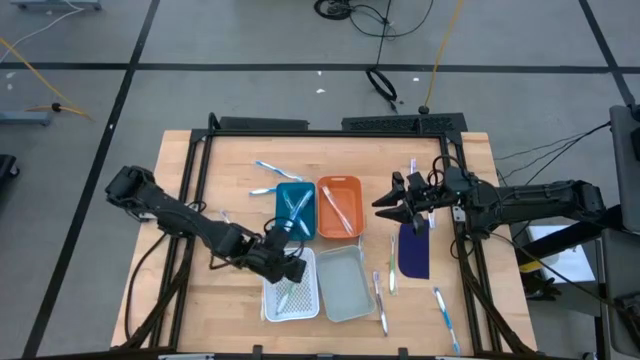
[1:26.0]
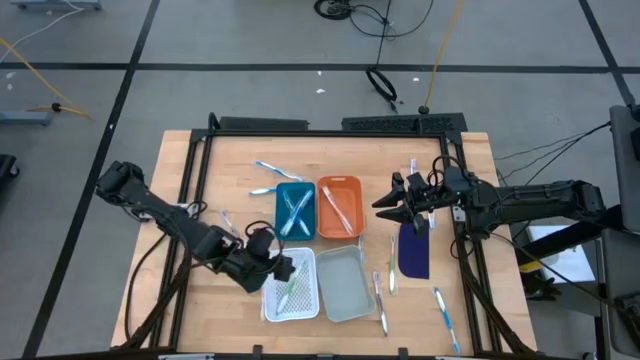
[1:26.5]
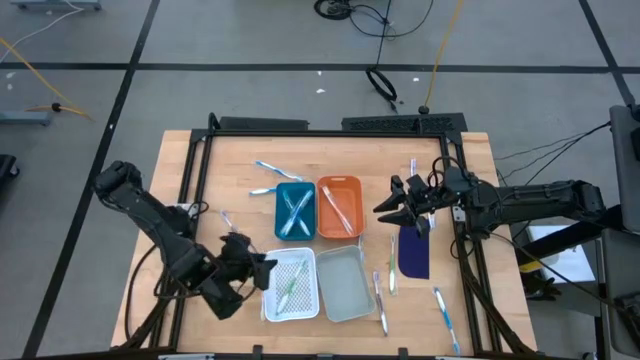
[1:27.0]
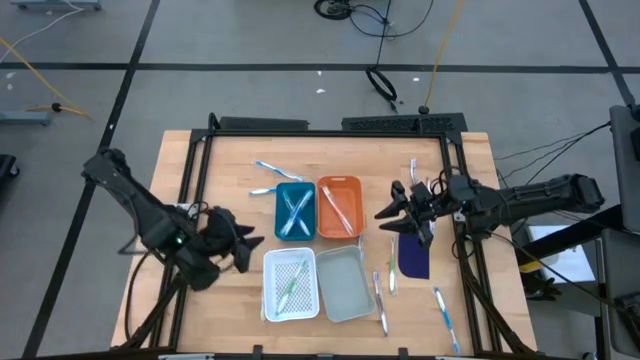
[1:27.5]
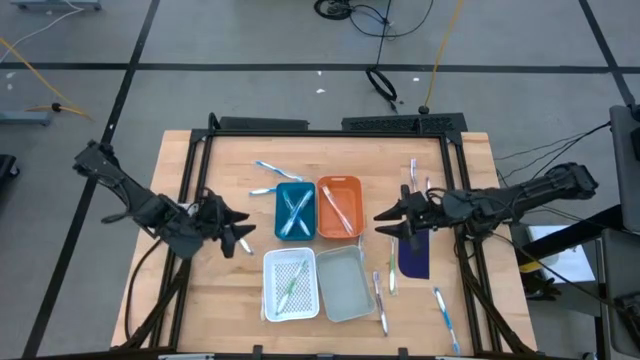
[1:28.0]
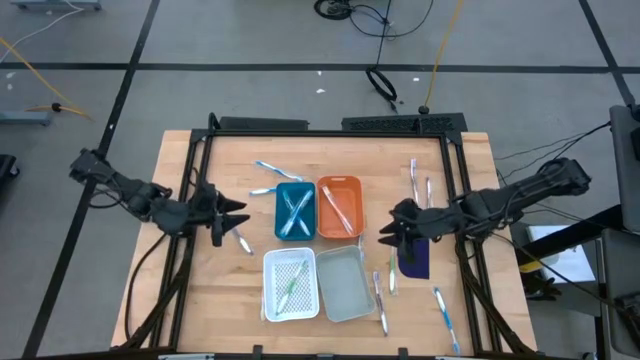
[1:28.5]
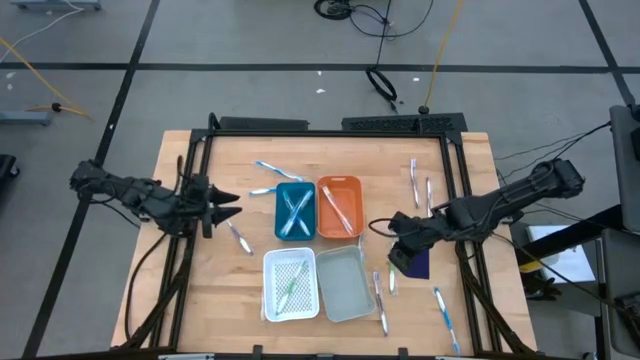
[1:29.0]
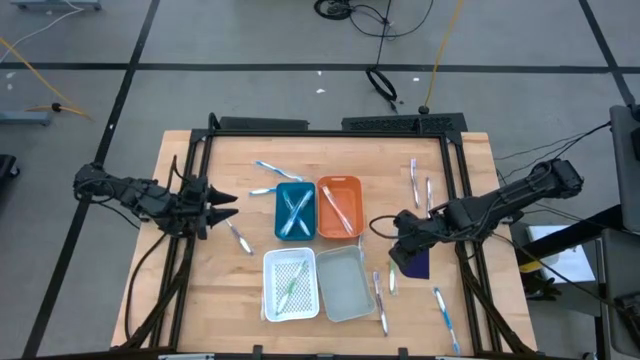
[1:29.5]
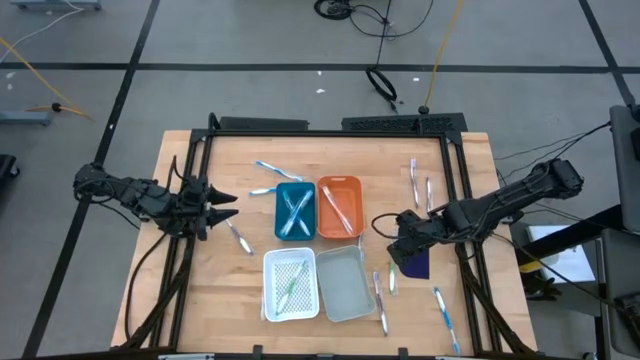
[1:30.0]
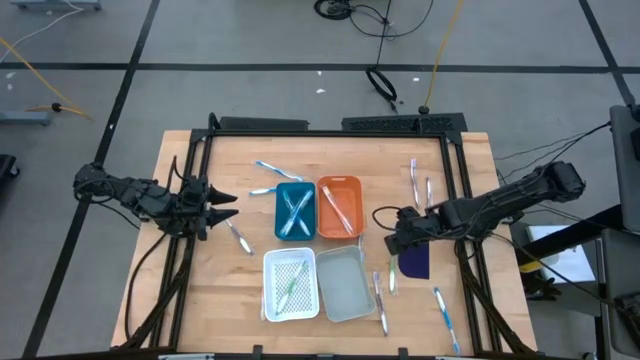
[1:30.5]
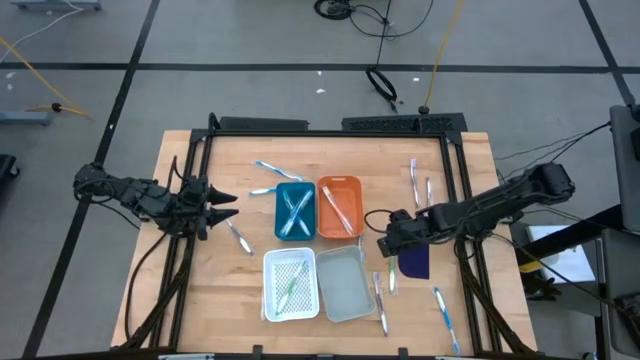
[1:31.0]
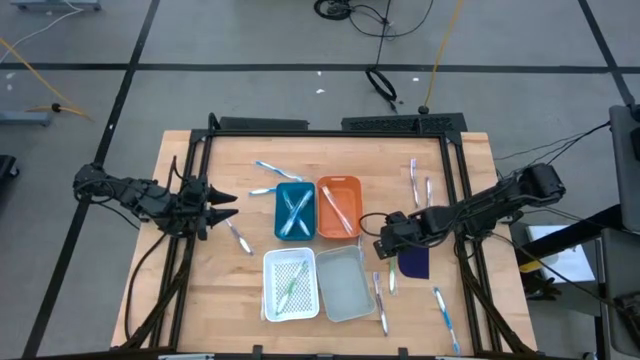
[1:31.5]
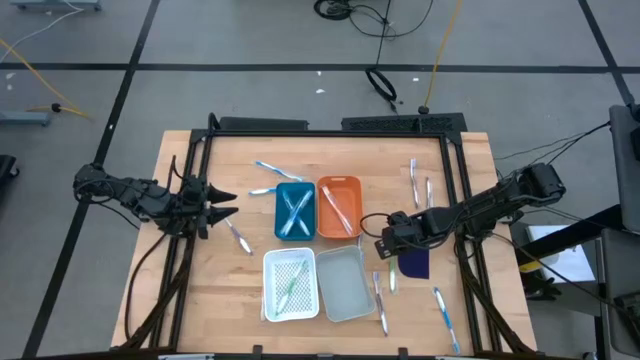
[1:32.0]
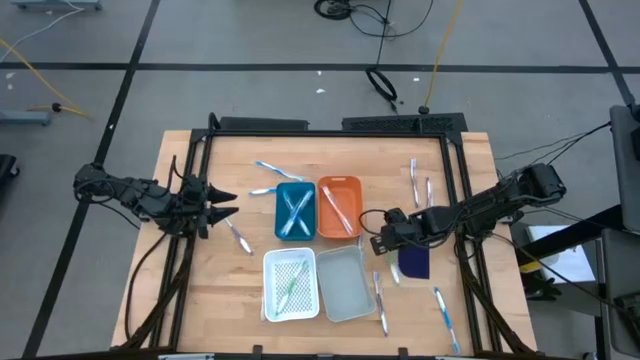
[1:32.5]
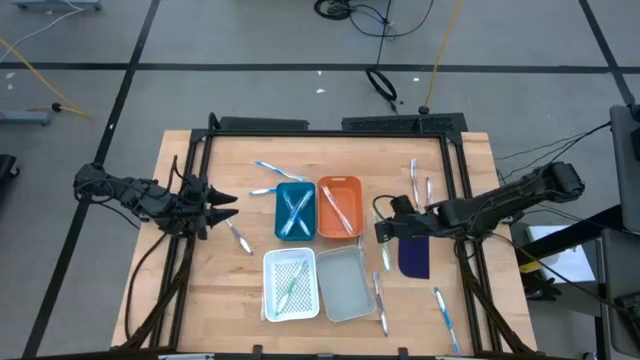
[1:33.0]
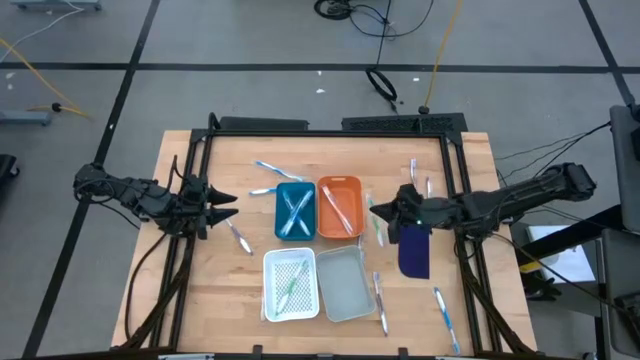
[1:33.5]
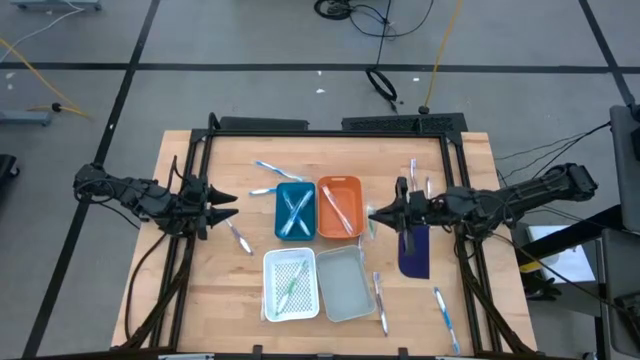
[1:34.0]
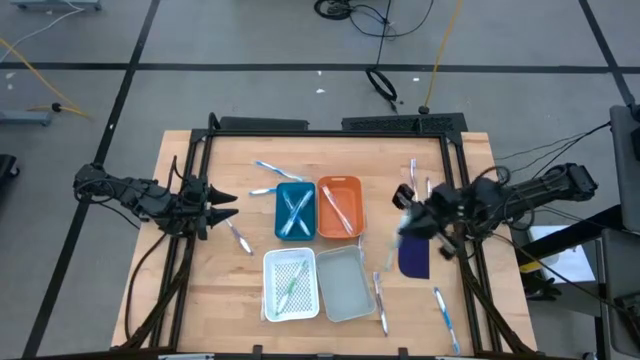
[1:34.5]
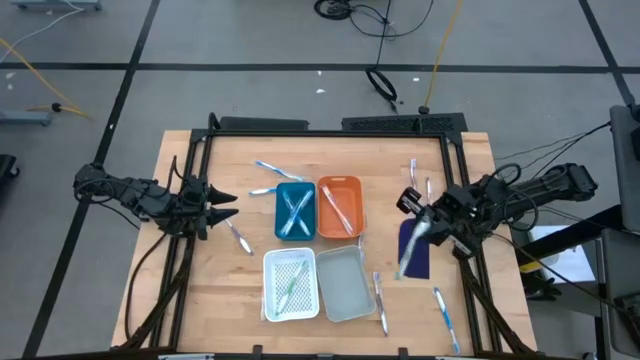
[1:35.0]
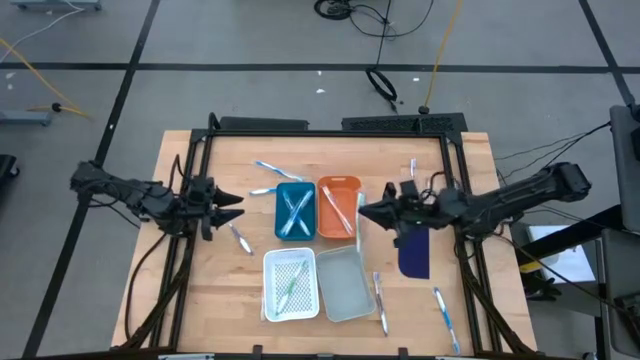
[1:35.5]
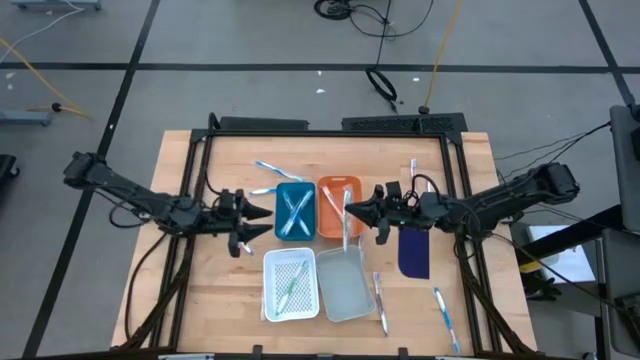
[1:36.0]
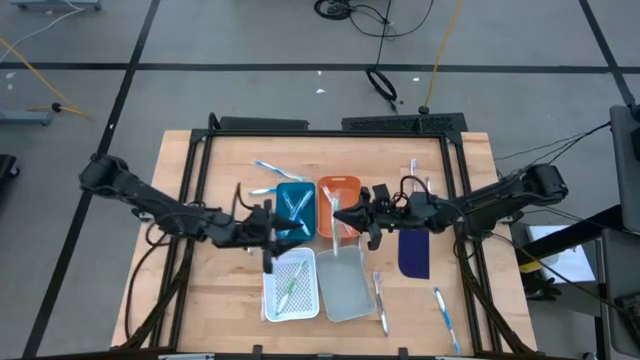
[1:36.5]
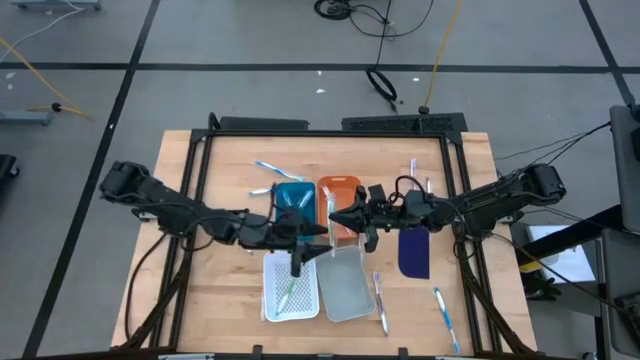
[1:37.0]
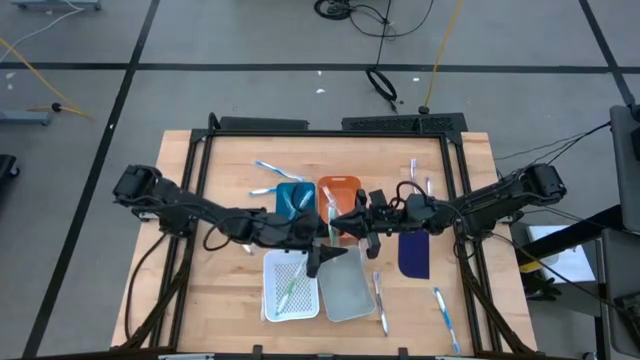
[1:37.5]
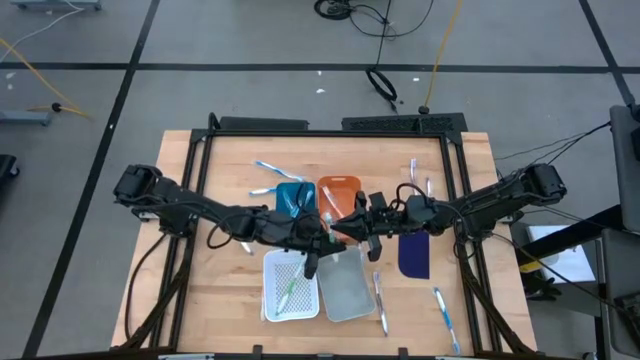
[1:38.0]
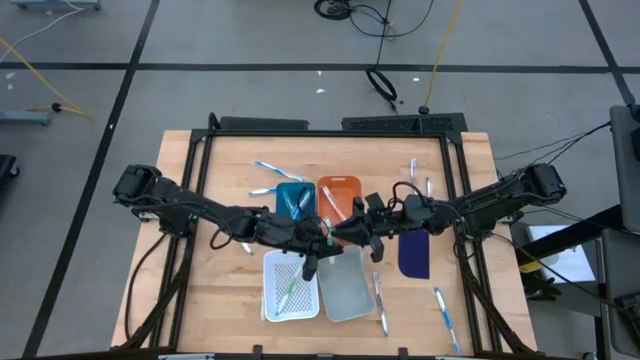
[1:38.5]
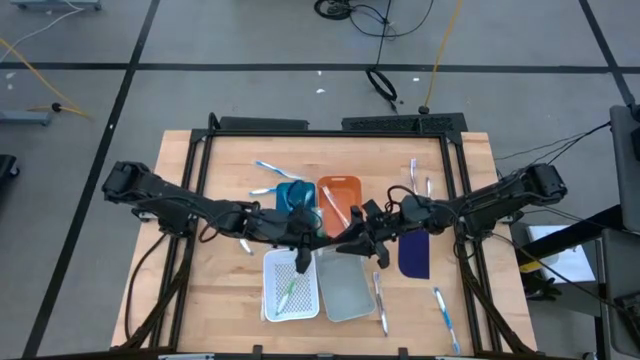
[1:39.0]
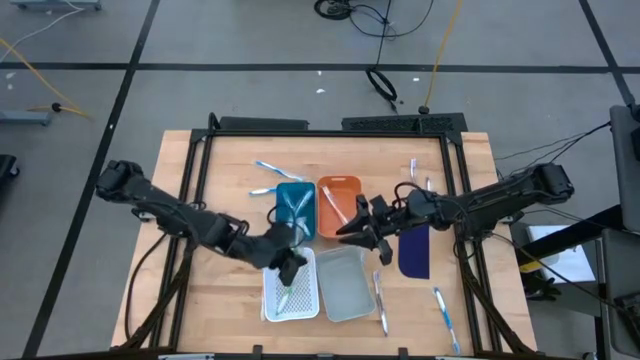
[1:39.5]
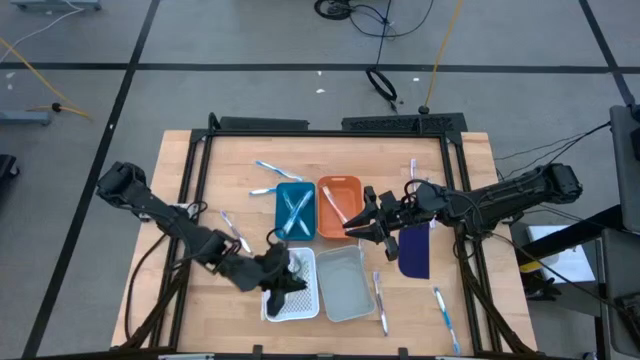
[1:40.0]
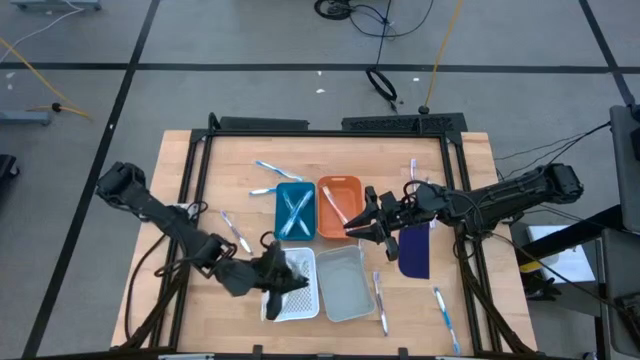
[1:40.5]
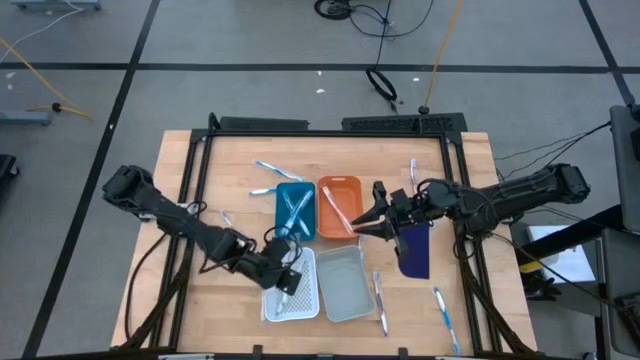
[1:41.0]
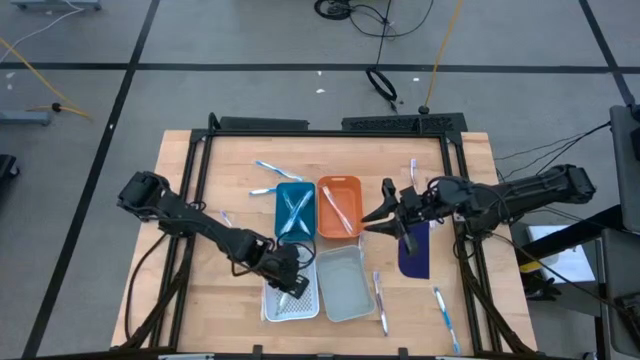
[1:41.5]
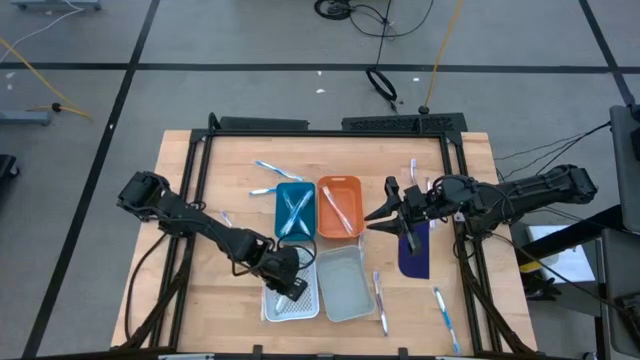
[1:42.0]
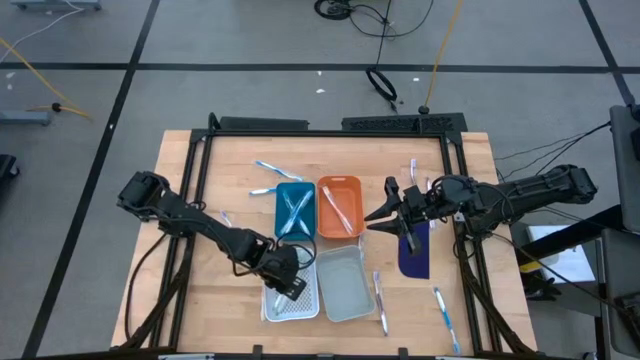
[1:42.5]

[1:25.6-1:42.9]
Task: Pick & Place Toothbrushes
Put the green toothbrush into the white bin

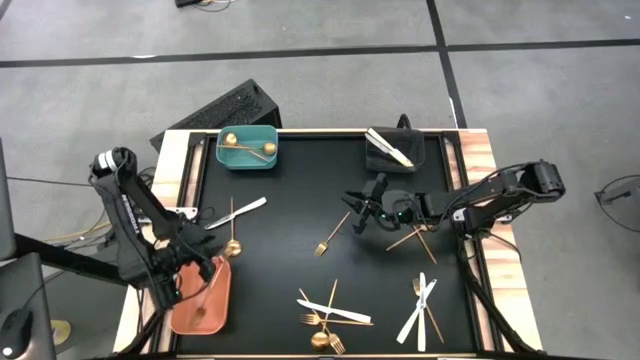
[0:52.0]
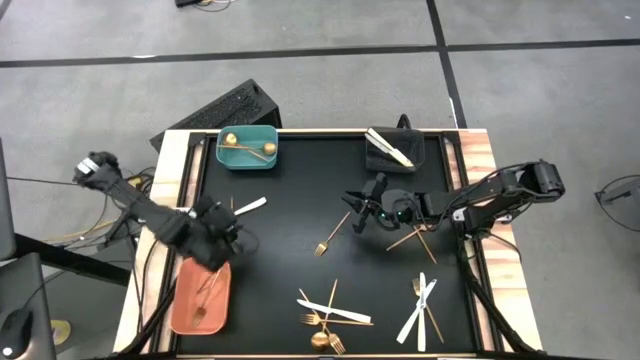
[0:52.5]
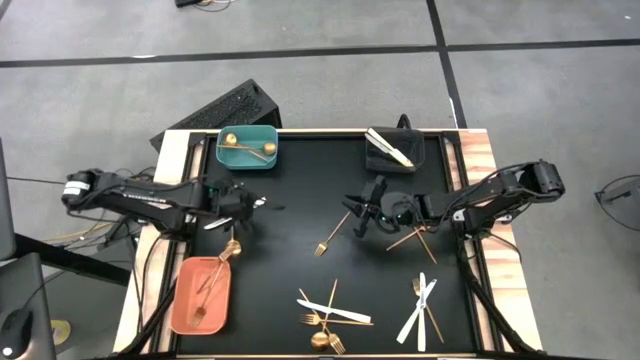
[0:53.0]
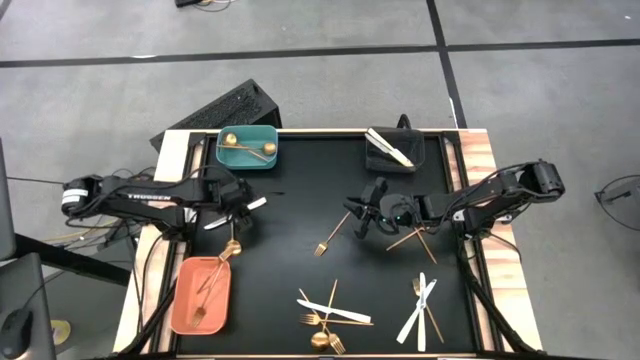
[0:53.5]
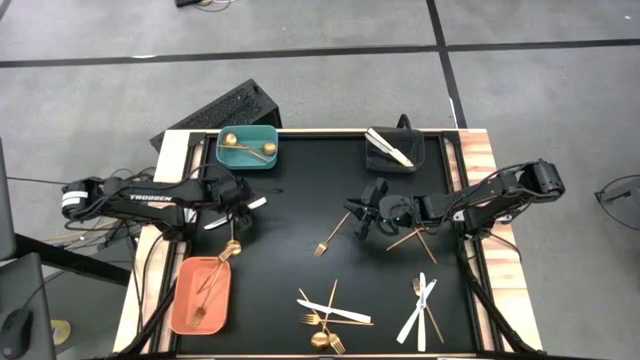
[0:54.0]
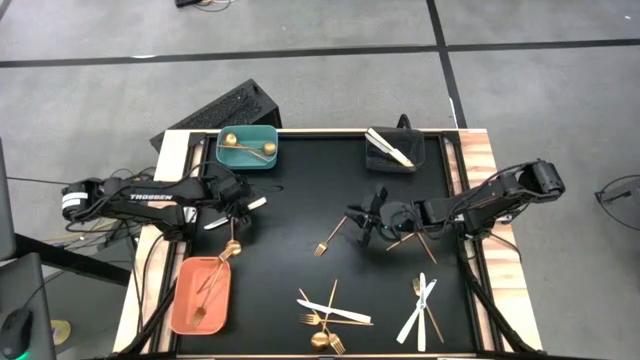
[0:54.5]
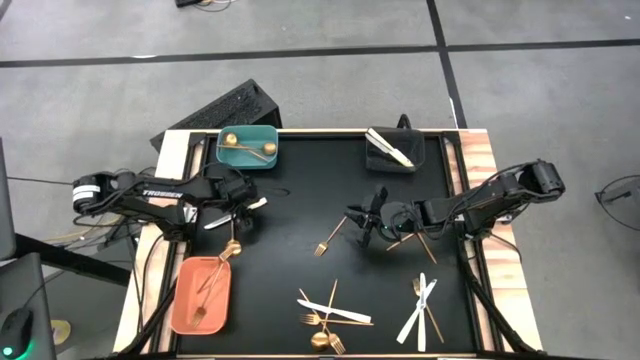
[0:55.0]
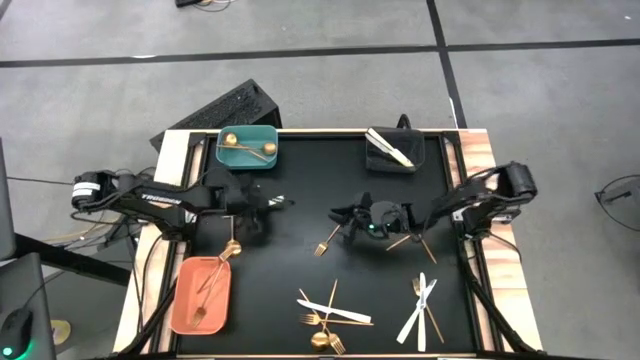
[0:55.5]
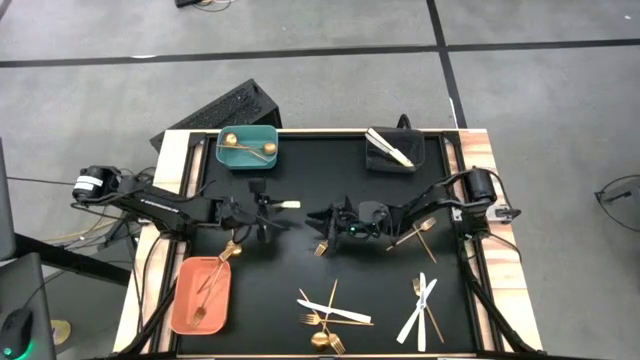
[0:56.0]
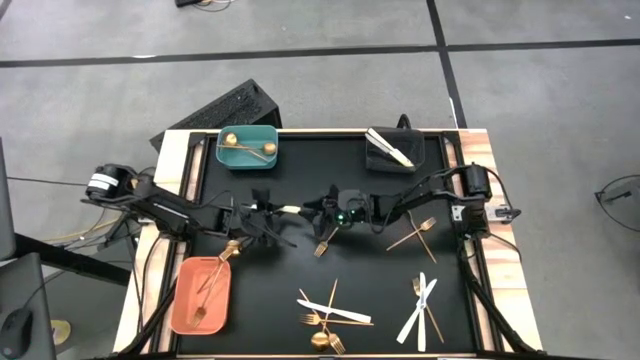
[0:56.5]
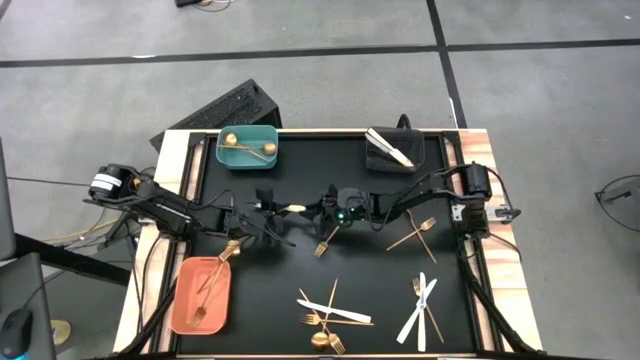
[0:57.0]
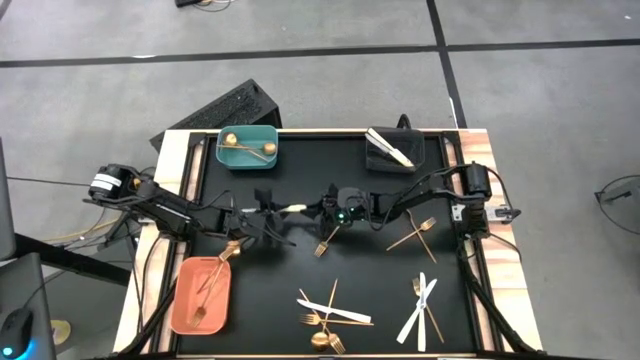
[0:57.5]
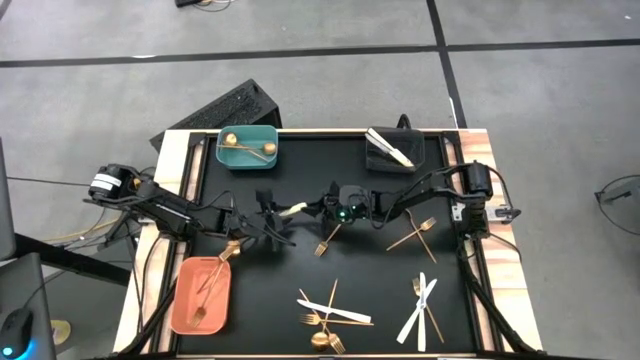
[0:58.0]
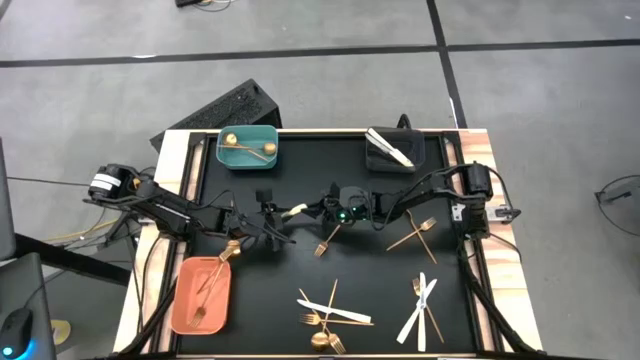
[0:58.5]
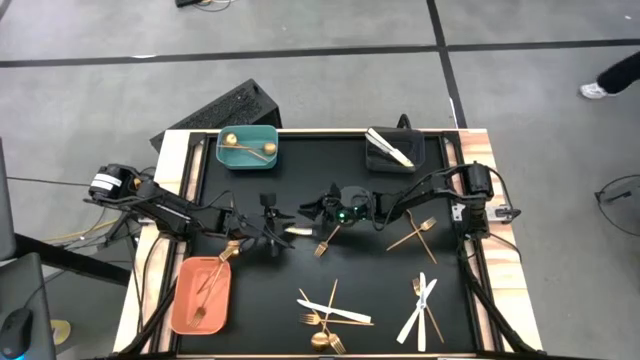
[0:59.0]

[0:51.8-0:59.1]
Task: Sort silverware by color (type)
Put the white knife into the black bin
